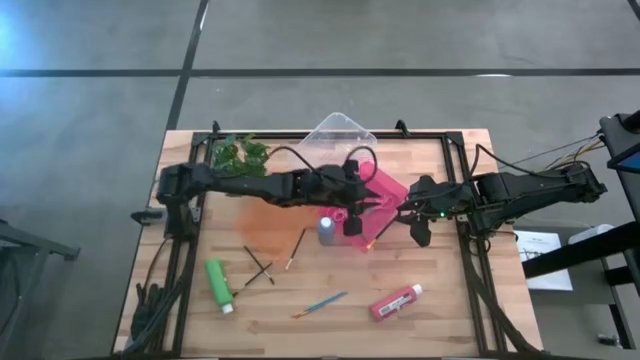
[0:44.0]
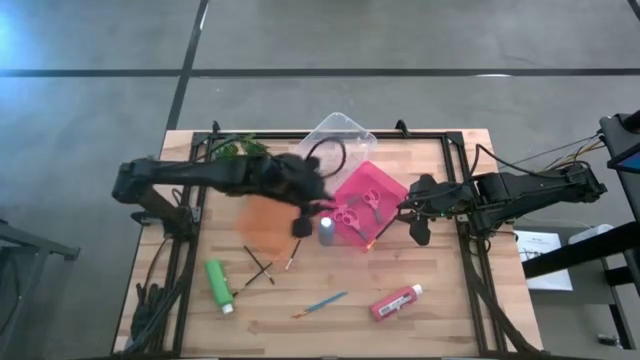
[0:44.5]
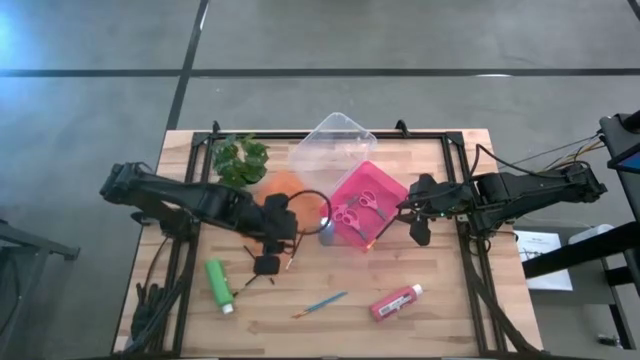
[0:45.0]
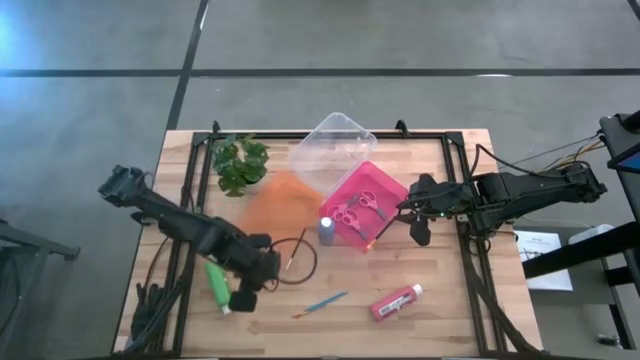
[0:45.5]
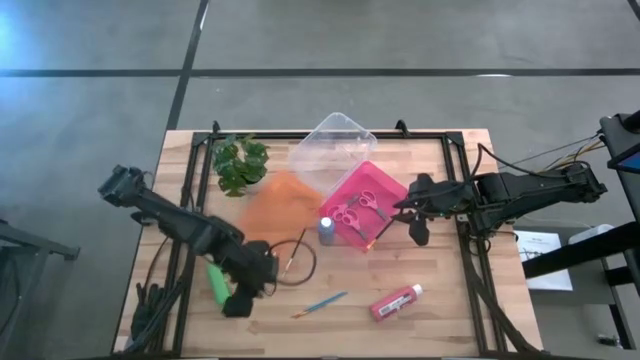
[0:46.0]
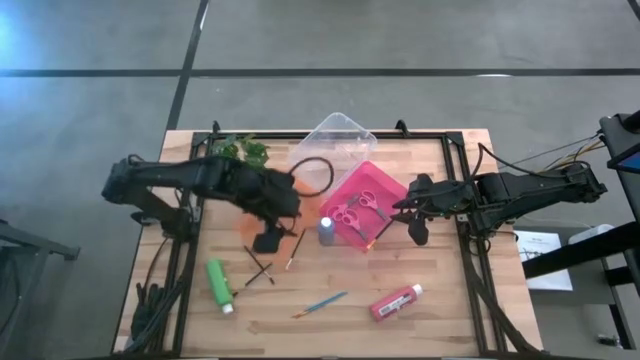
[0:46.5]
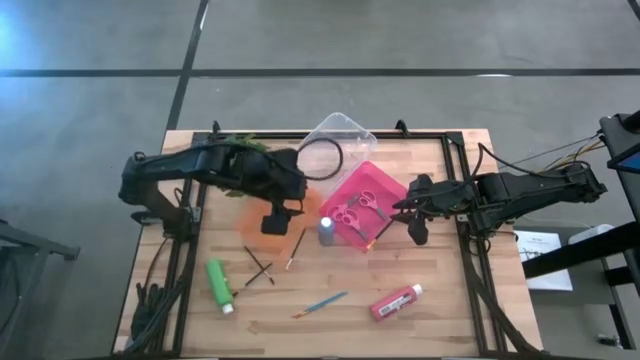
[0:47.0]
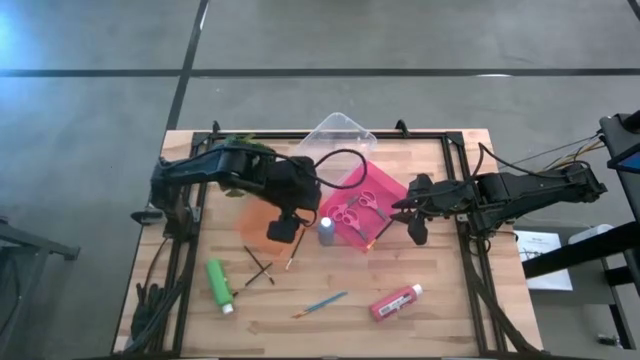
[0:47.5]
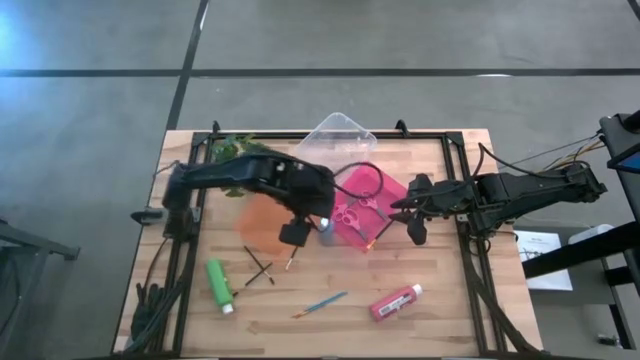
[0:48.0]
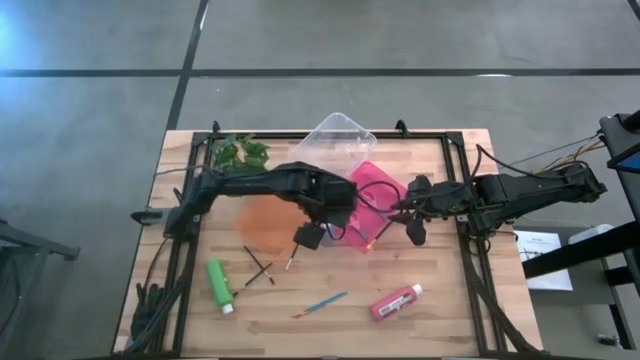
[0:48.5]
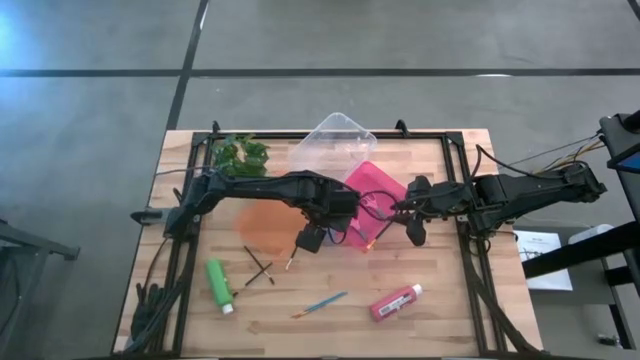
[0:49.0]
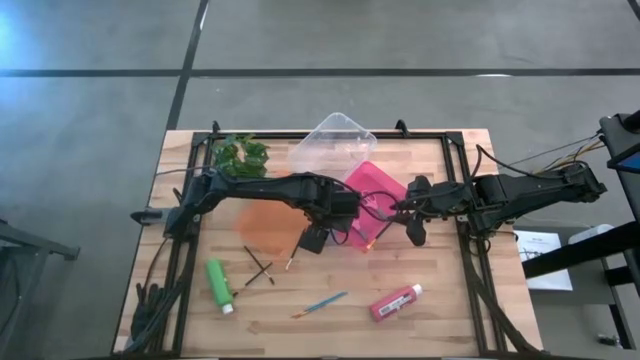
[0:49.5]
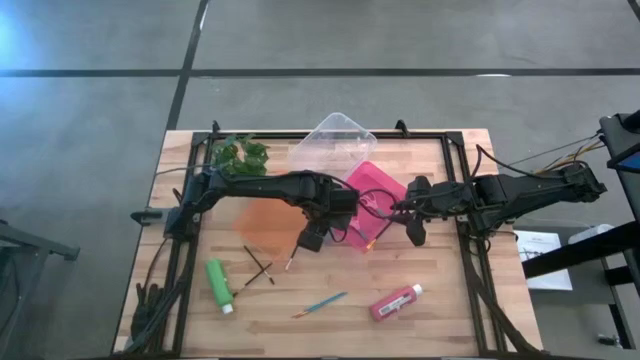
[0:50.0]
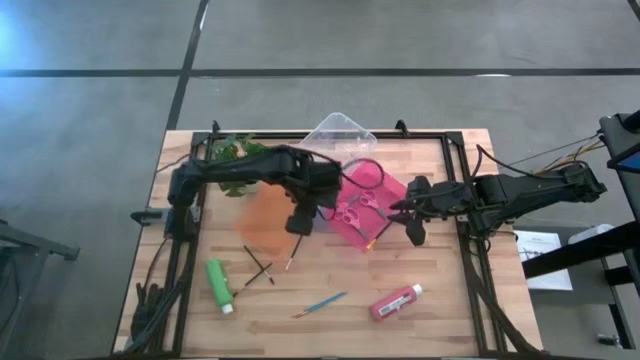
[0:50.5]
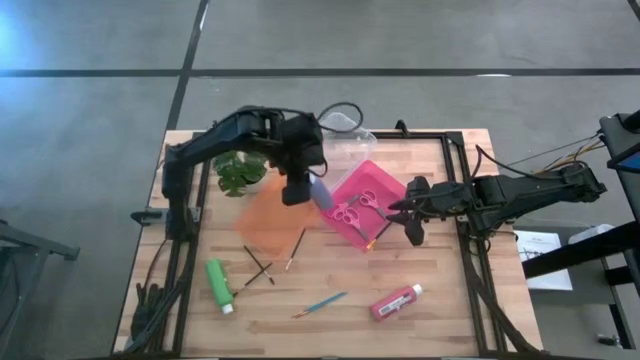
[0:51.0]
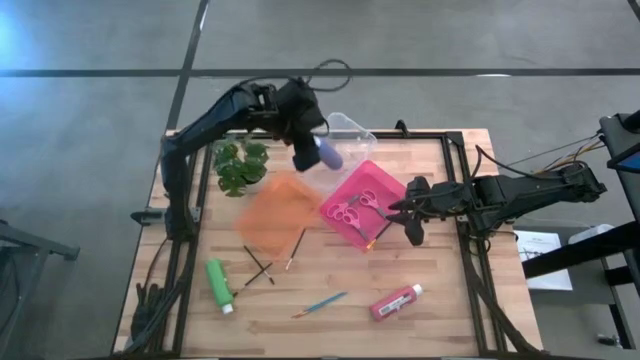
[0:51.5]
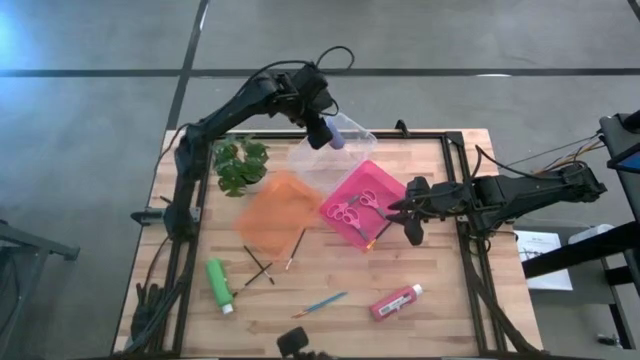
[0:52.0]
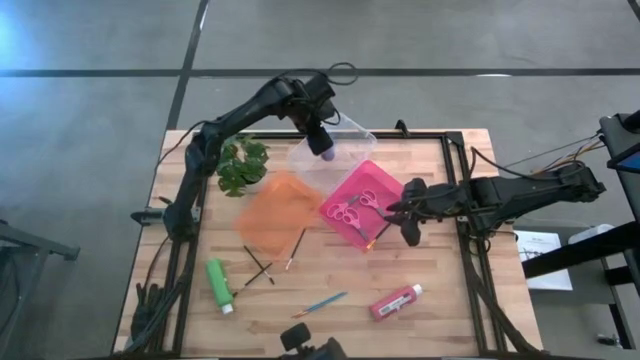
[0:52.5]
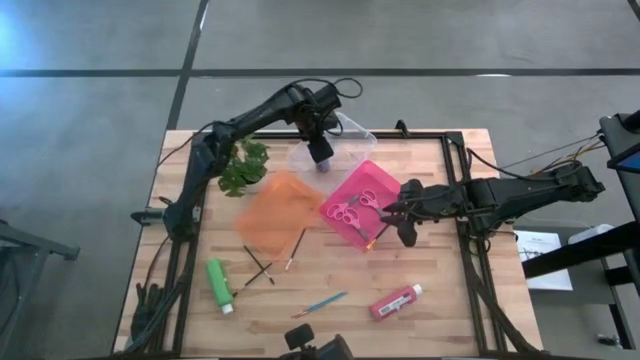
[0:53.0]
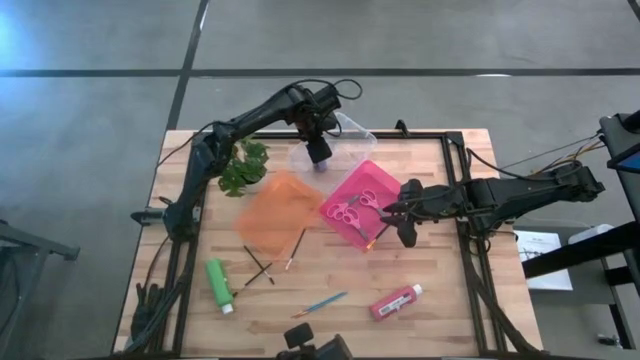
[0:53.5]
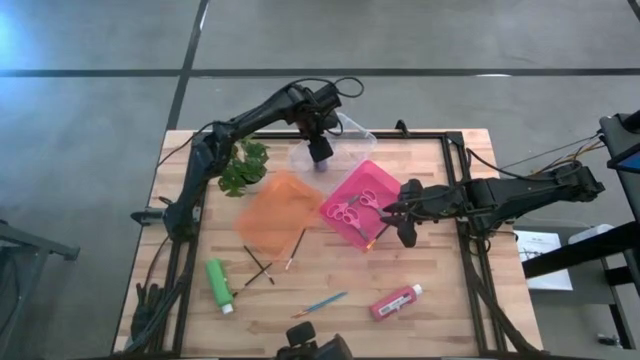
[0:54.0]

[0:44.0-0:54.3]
Task: Pick & Place Paint Supplies
Put the blue paint bottle into the transparent bin

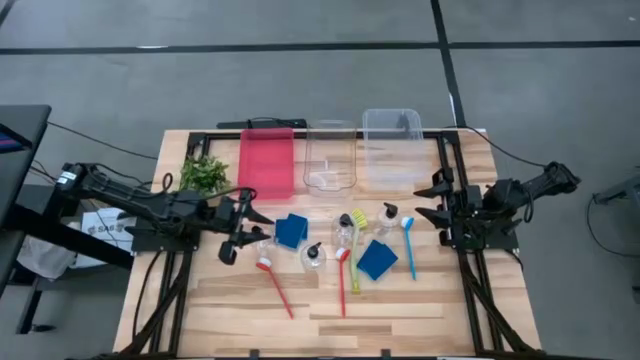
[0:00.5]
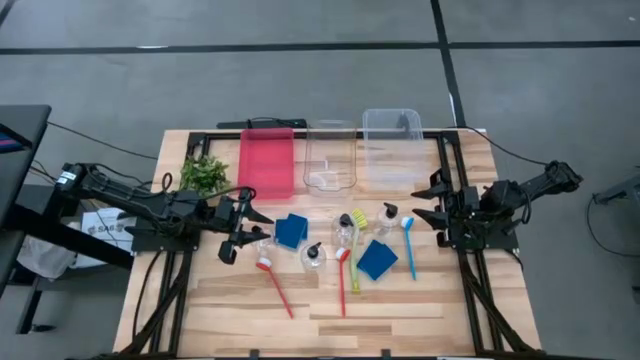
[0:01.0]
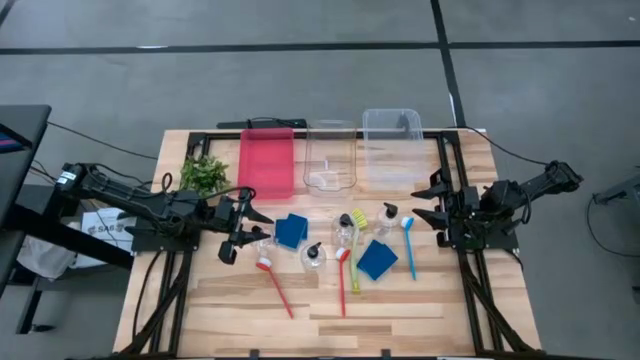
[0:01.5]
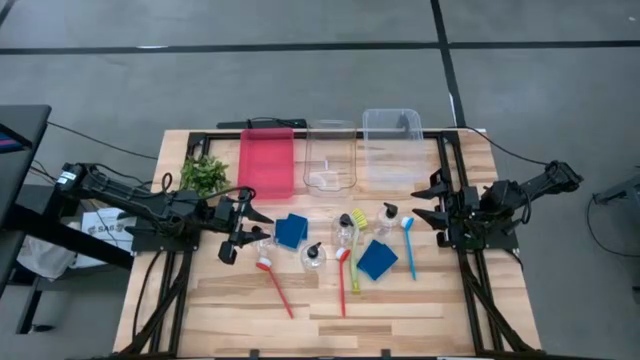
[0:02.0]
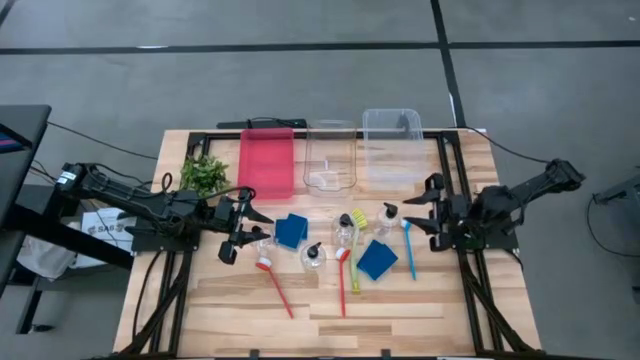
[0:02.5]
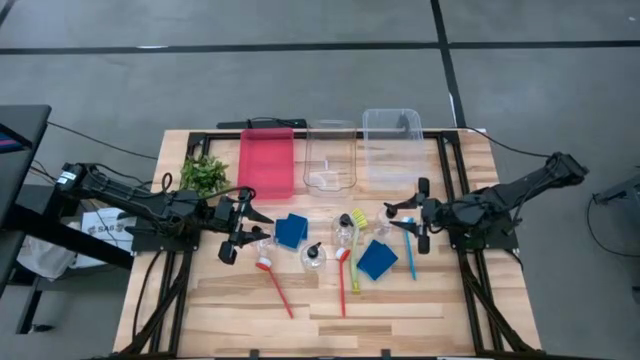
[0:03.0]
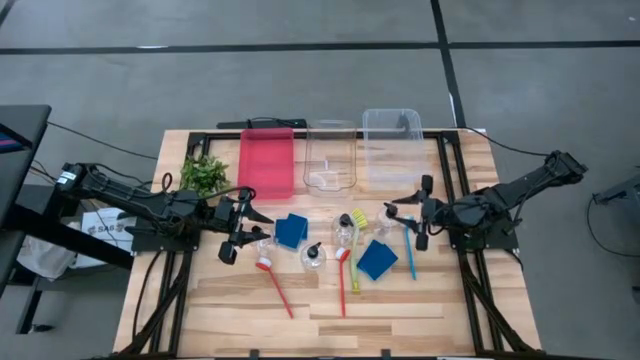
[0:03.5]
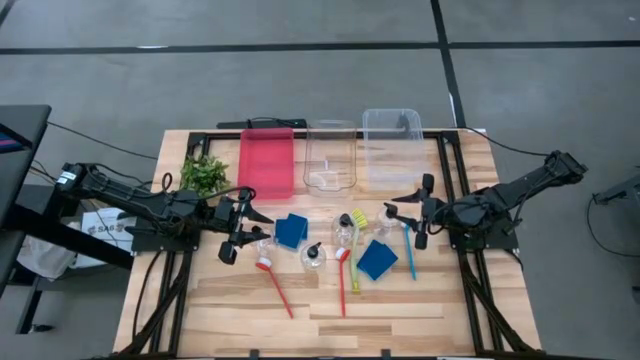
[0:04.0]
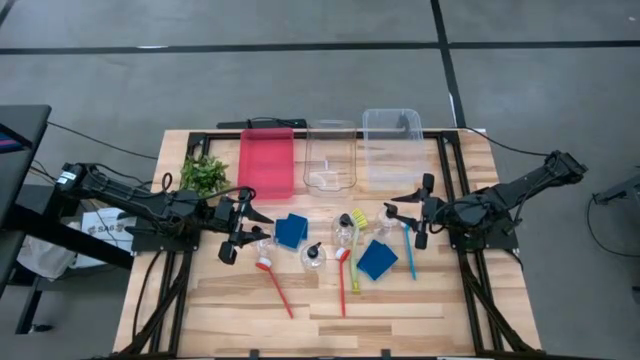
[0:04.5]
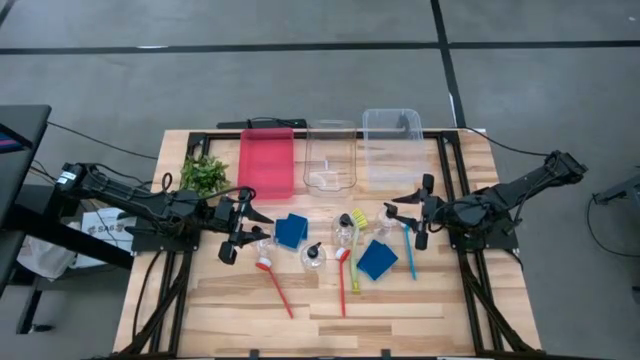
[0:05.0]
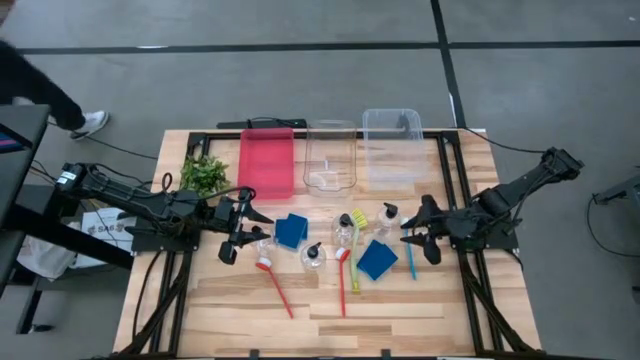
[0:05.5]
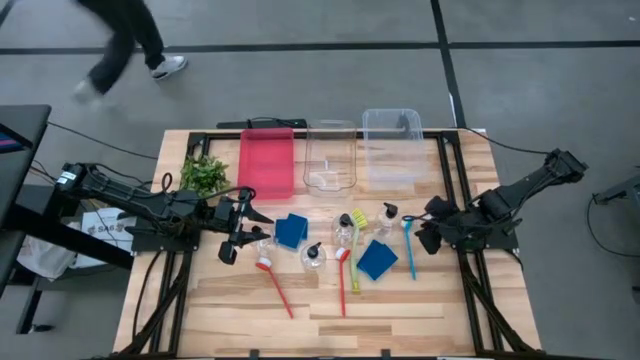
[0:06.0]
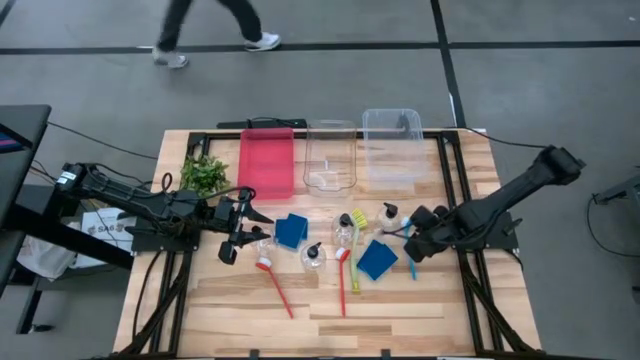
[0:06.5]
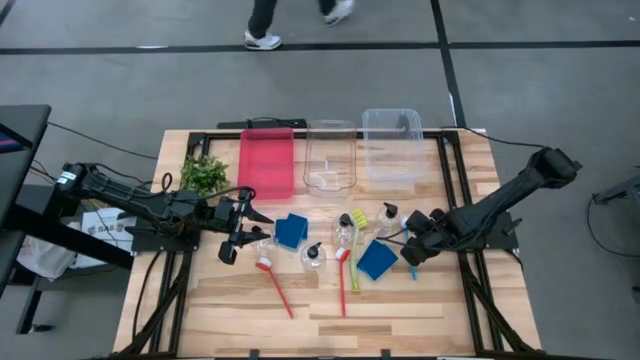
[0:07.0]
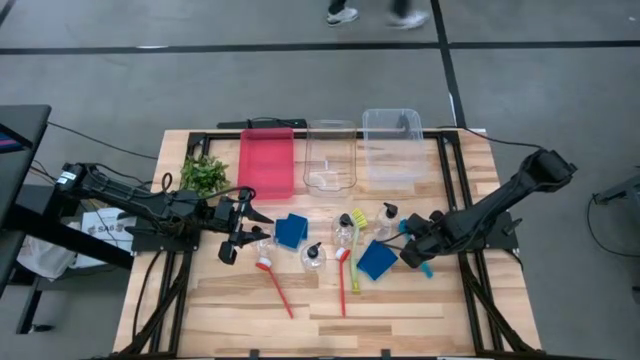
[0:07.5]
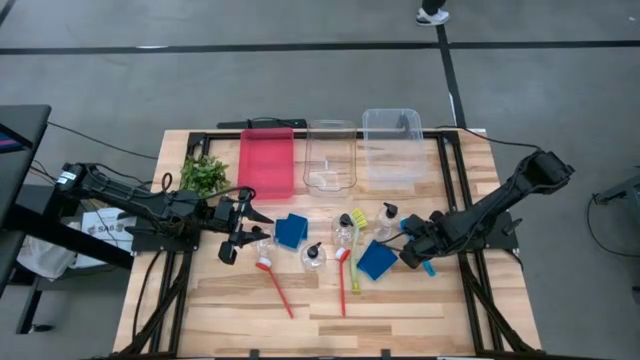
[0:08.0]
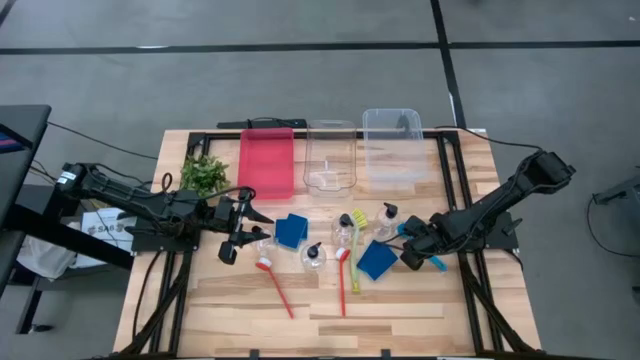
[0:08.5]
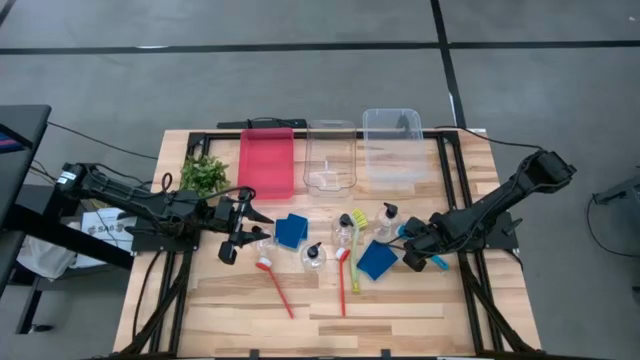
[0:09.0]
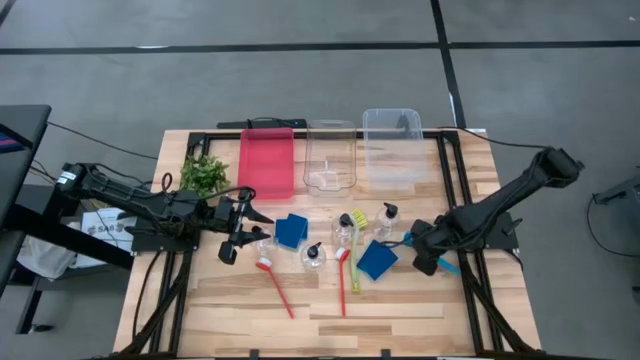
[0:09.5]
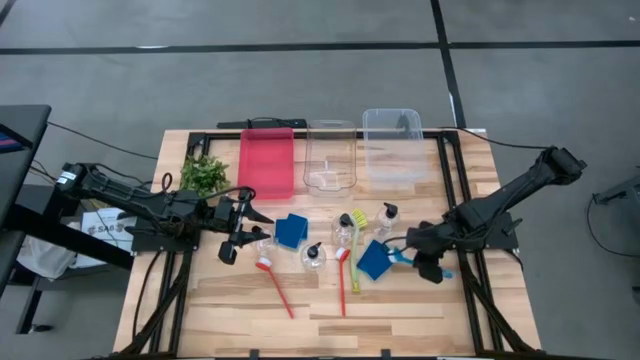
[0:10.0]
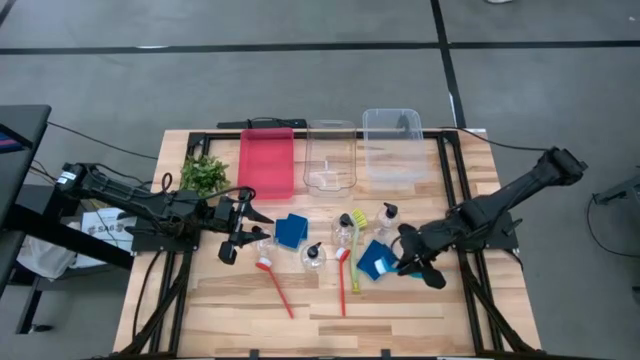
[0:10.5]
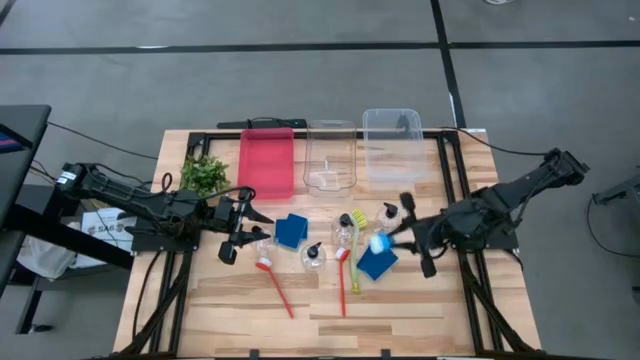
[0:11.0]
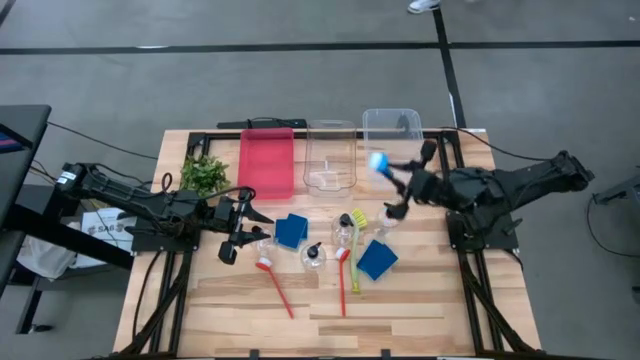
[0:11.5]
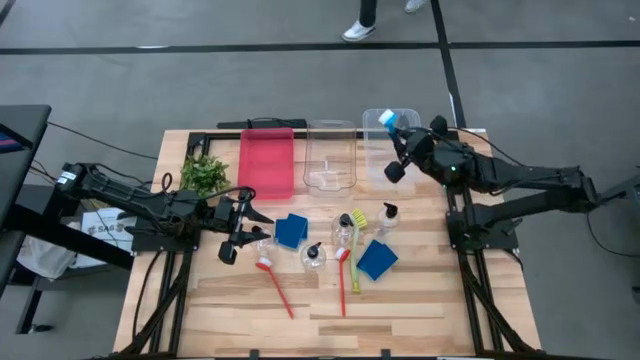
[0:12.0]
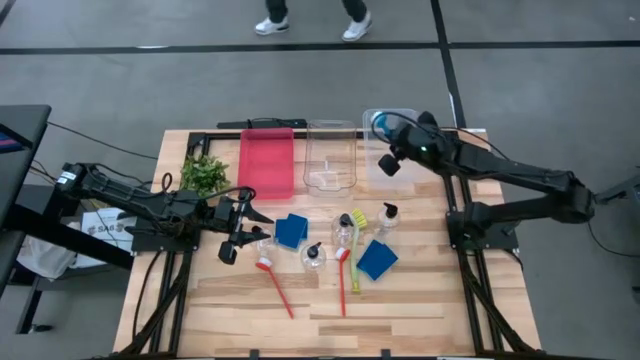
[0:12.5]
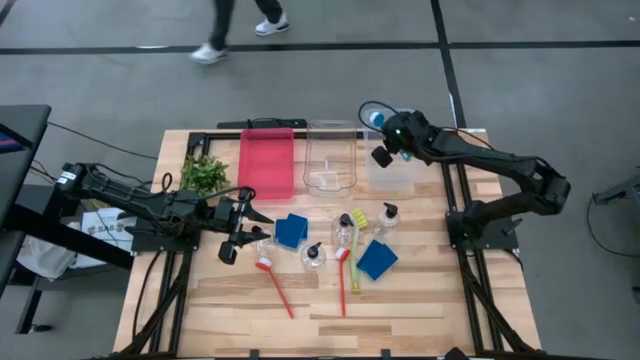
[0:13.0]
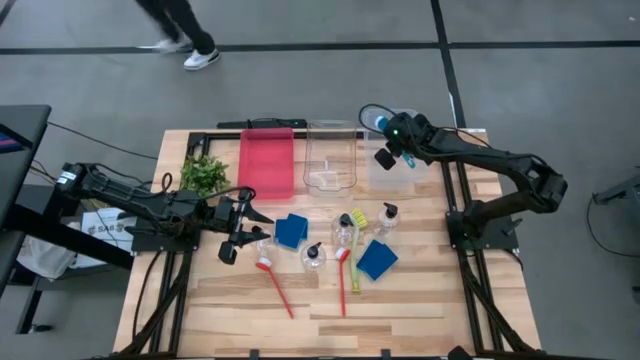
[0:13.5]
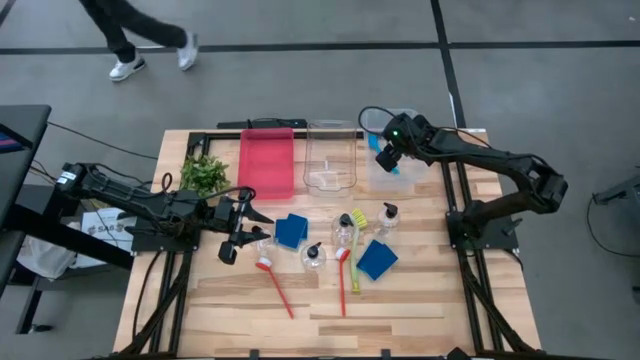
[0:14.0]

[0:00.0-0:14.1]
Task: Pick & Place Kitchen Sink Supplies
Put the blue dishwashing brush into the white transparent bin
